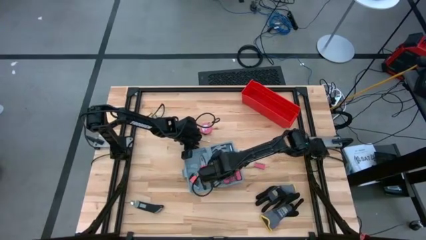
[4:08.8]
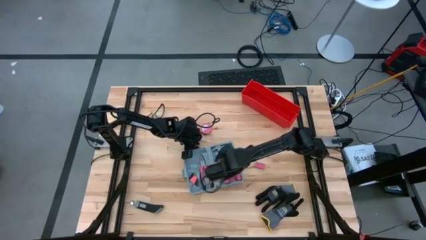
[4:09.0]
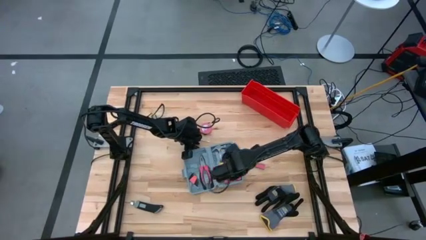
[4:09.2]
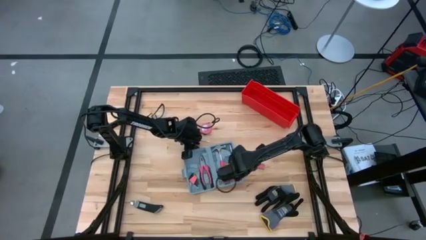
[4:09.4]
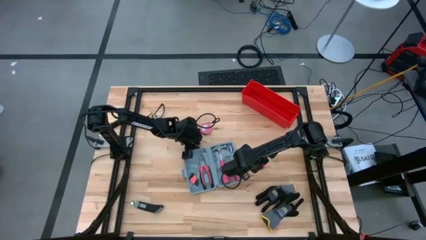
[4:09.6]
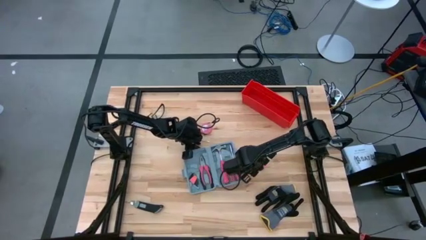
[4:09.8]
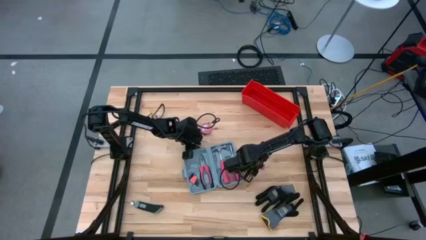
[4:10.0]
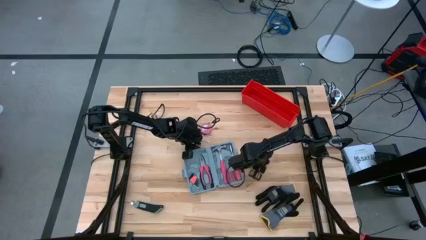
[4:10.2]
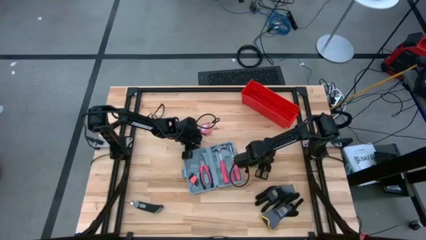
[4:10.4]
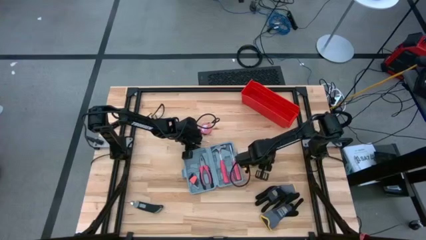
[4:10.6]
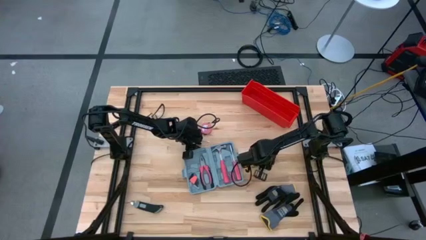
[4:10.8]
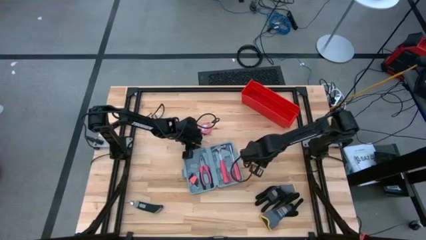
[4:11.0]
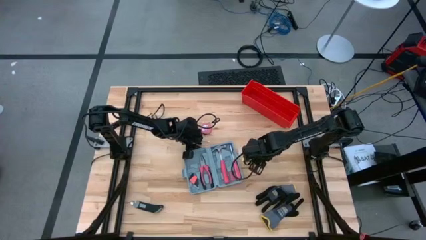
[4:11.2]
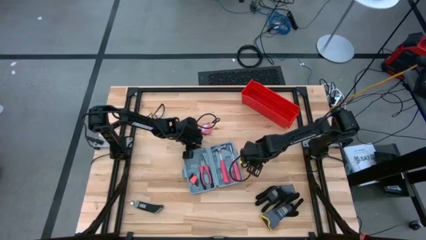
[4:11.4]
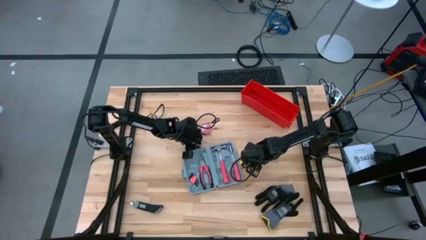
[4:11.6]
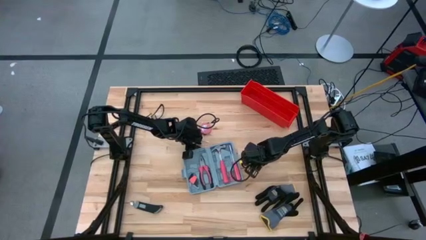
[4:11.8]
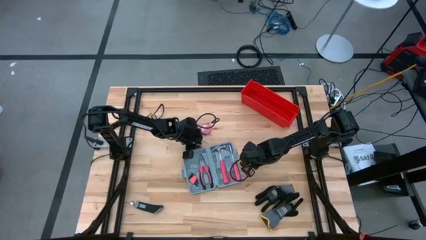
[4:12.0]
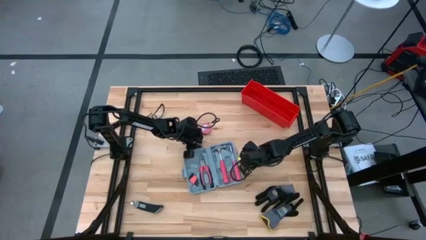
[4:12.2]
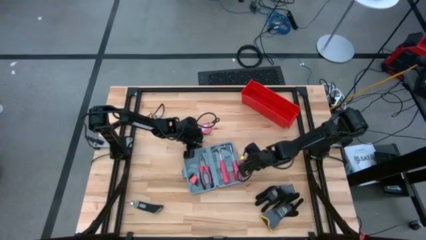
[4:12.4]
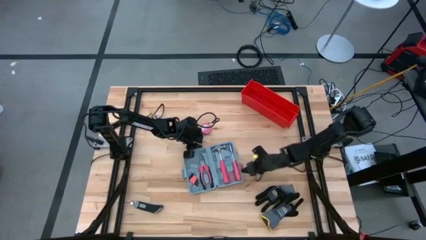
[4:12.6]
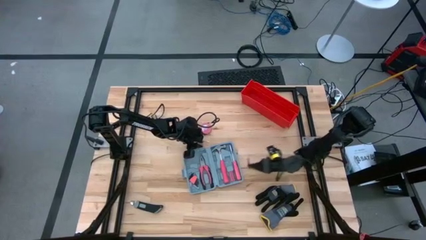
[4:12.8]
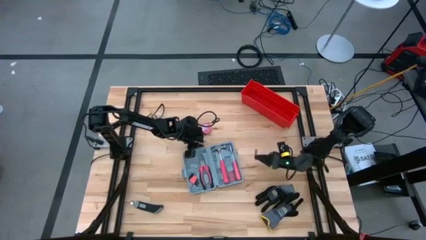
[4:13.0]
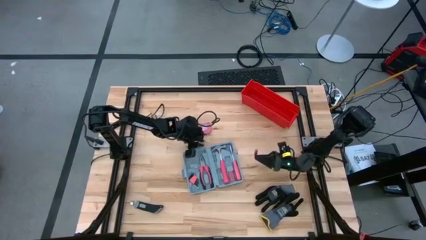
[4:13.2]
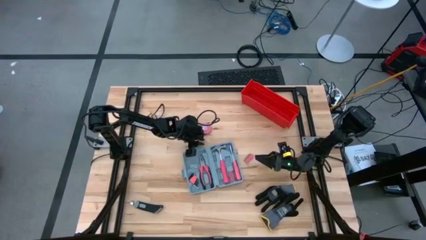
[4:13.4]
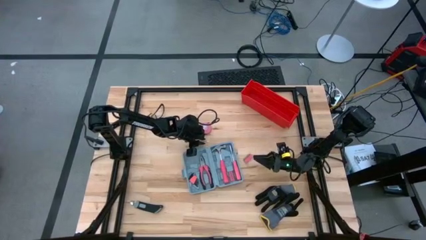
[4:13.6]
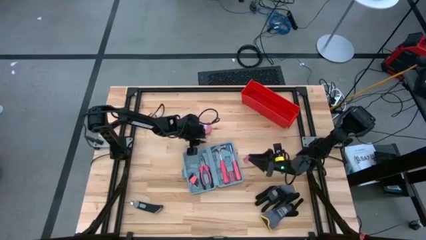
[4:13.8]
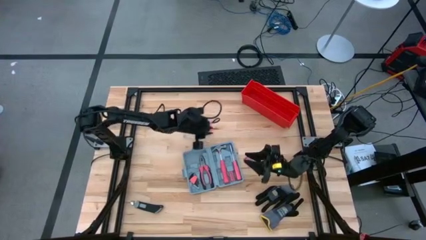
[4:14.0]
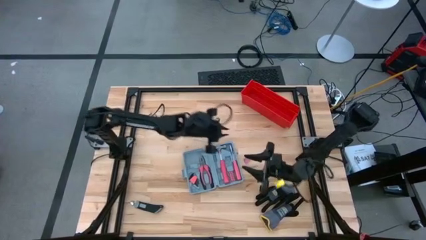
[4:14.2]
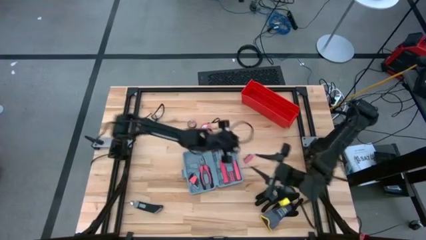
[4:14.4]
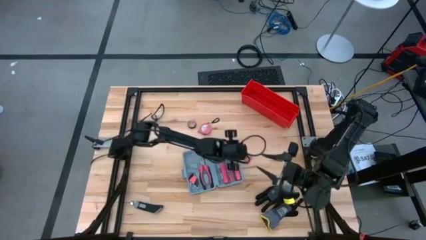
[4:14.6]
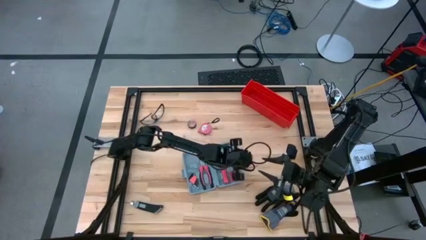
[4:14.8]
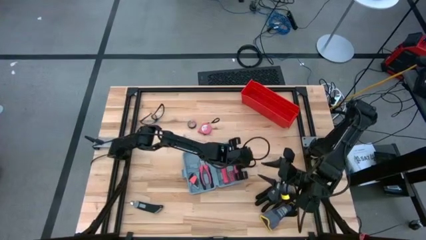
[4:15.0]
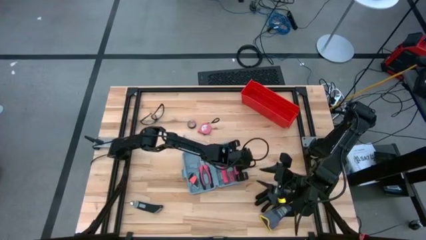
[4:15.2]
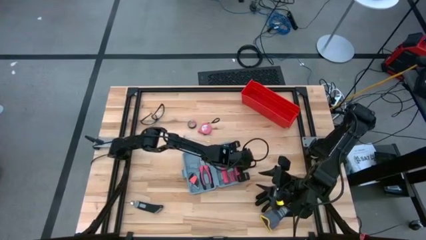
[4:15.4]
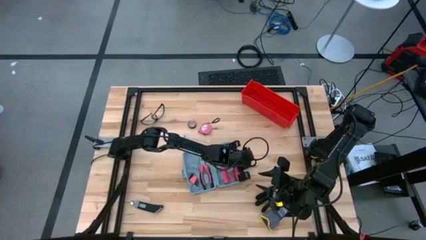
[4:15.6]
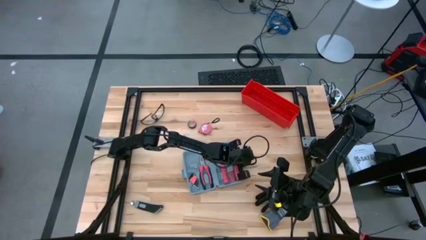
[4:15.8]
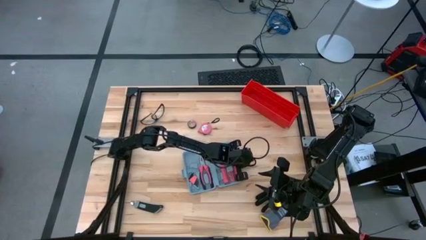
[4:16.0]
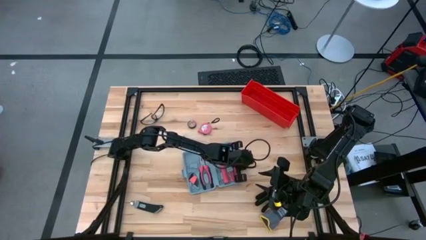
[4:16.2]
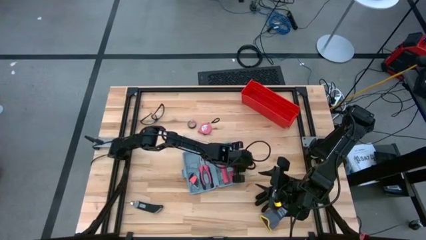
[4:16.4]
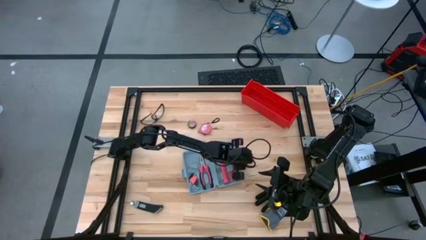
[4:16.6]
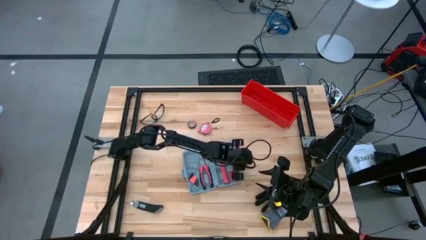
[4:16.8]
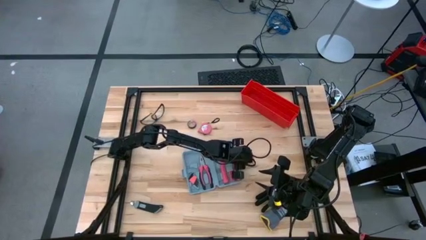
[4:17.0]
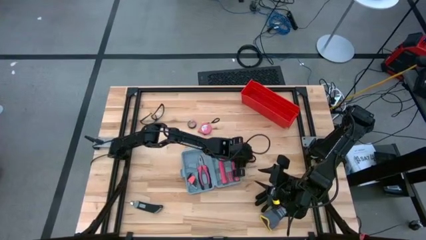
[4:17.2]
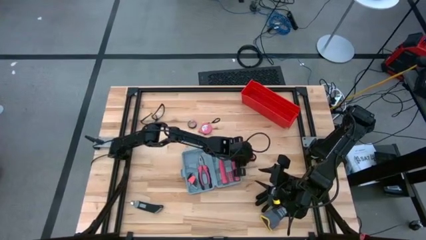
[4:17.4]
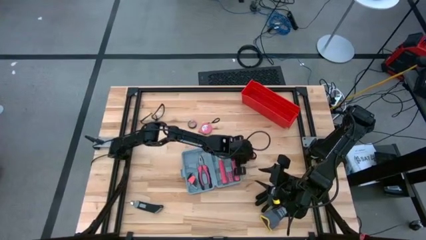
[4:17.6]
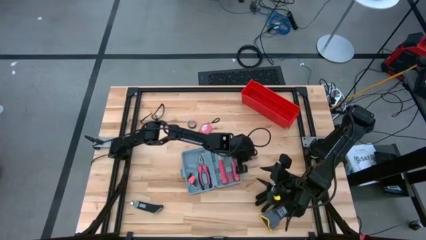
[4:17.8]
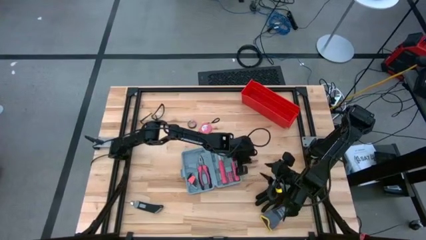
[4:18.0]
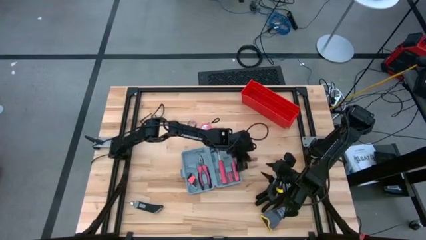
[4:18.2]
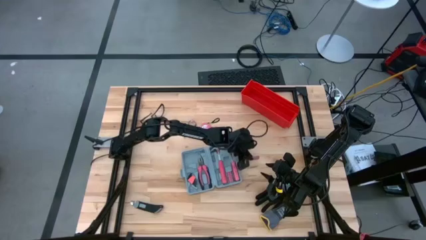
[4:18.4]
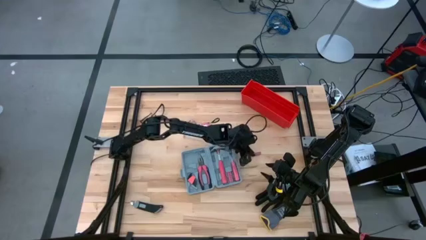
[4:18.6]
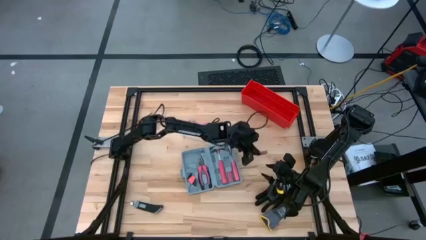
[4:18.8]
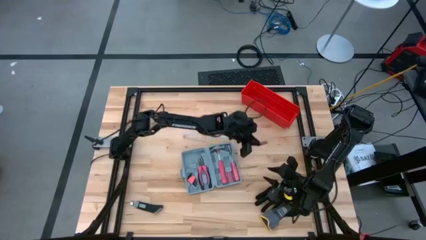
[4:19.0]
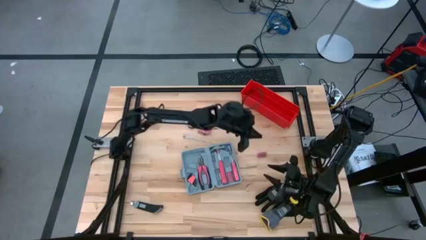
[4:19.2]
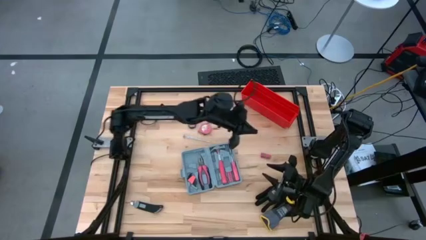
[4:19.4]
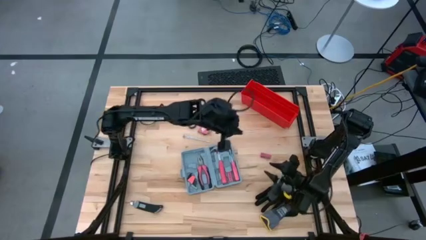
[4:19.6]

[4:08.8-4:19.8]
Task: prefit tool cases
Put the screwdriver bits into the toolbox

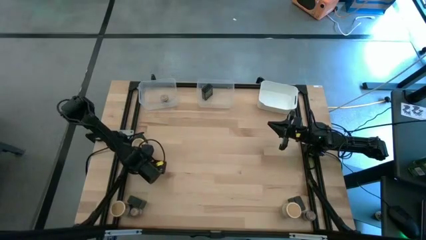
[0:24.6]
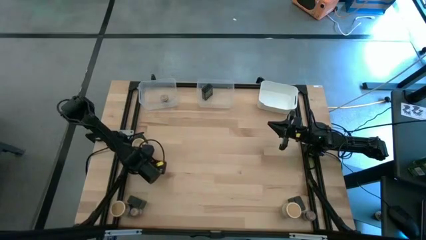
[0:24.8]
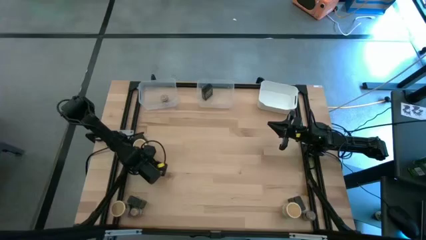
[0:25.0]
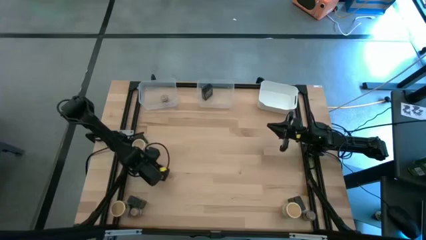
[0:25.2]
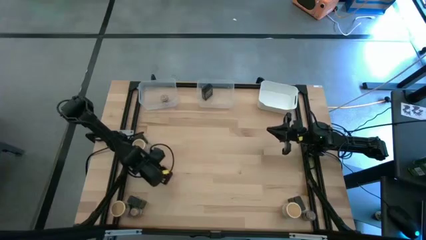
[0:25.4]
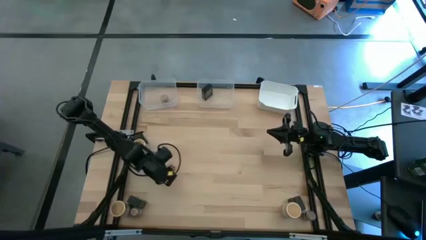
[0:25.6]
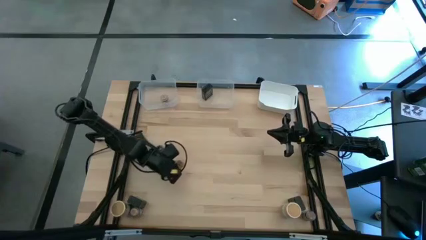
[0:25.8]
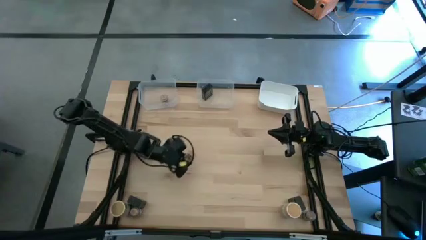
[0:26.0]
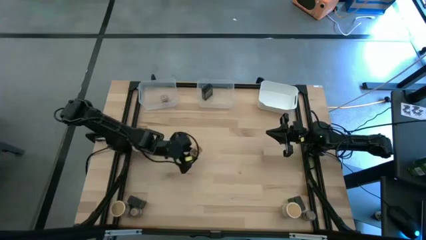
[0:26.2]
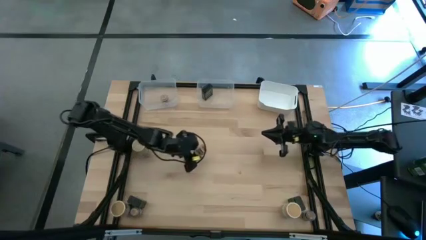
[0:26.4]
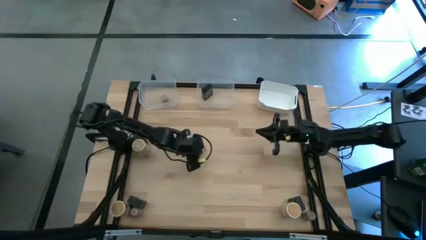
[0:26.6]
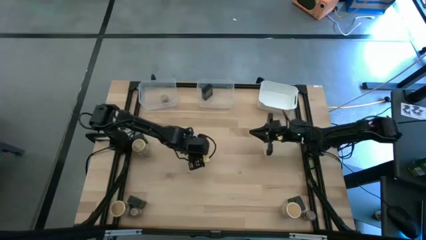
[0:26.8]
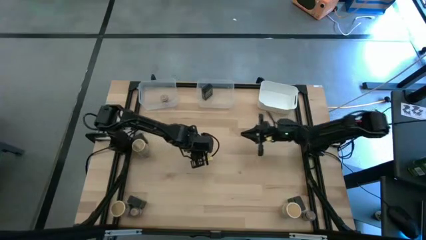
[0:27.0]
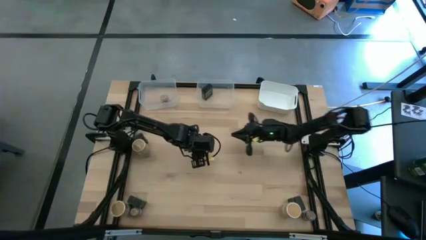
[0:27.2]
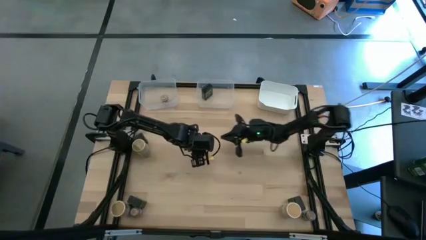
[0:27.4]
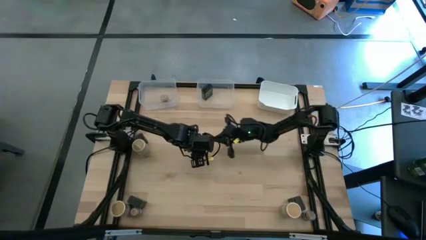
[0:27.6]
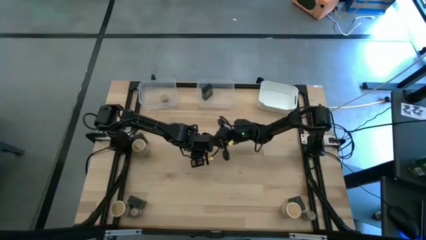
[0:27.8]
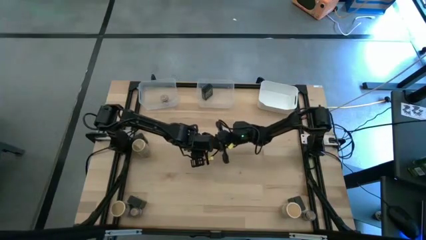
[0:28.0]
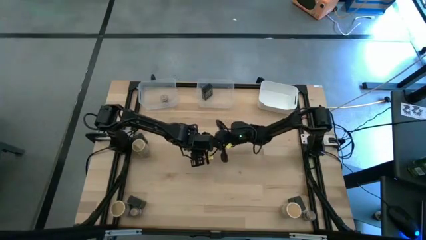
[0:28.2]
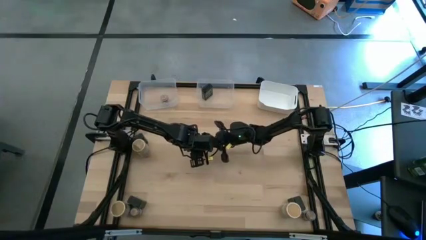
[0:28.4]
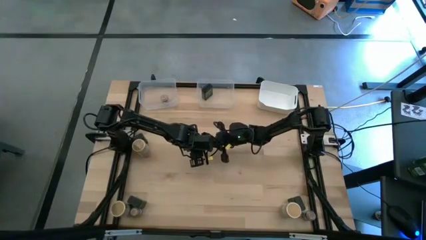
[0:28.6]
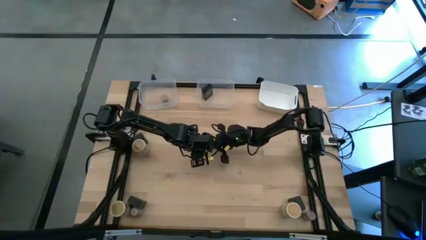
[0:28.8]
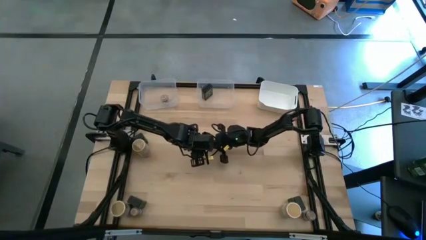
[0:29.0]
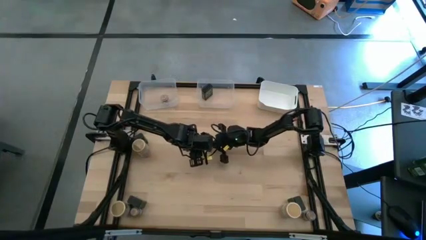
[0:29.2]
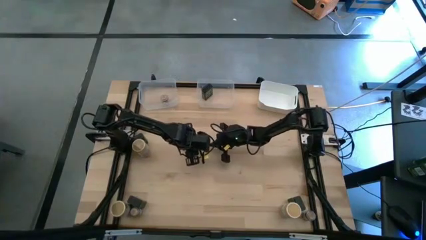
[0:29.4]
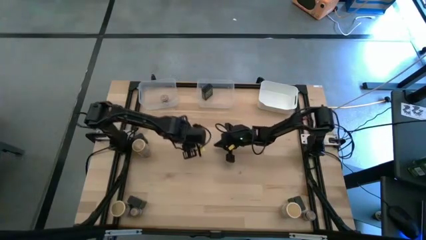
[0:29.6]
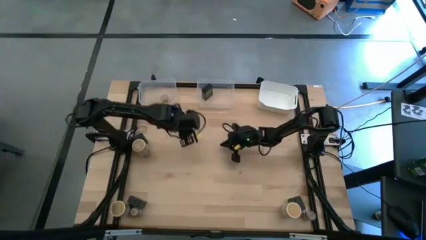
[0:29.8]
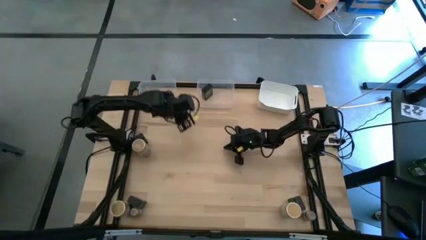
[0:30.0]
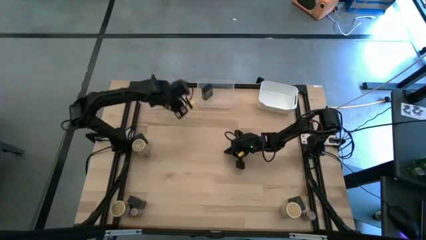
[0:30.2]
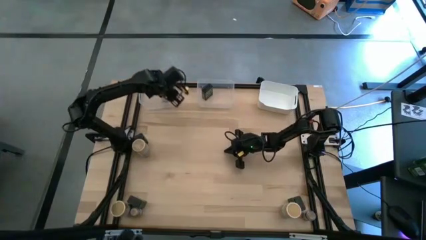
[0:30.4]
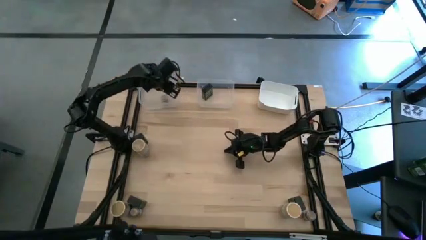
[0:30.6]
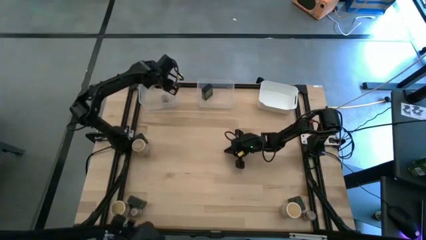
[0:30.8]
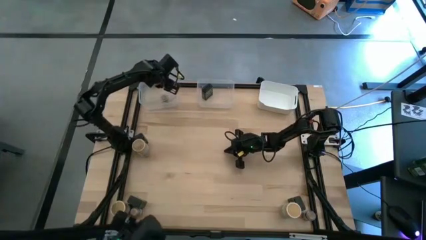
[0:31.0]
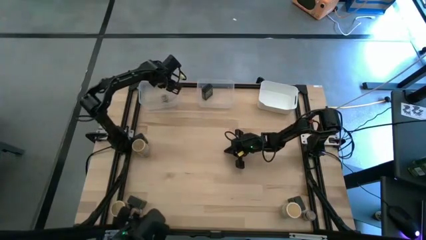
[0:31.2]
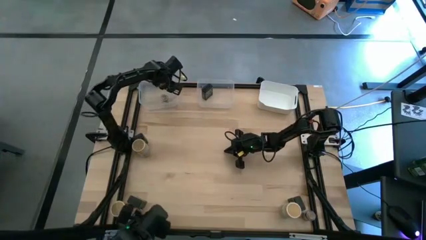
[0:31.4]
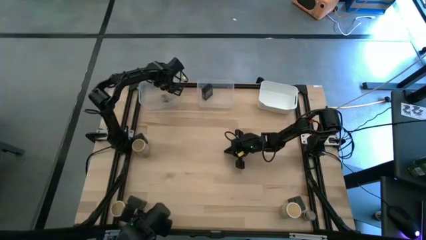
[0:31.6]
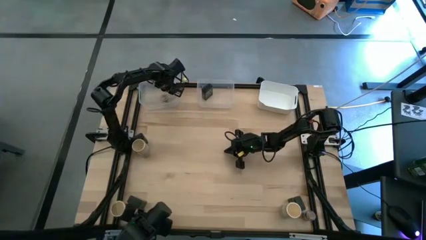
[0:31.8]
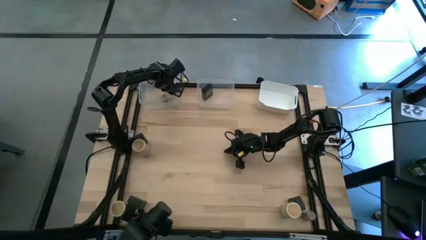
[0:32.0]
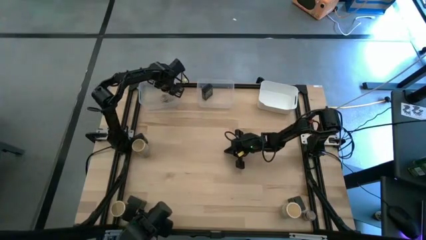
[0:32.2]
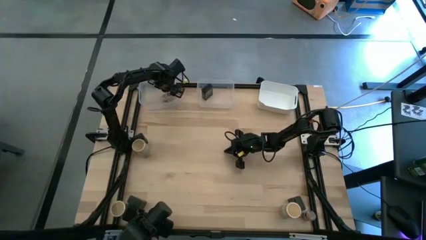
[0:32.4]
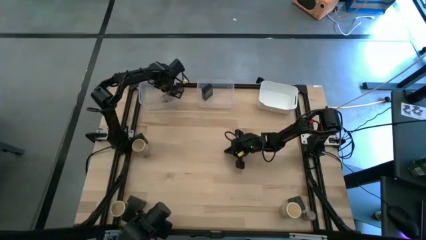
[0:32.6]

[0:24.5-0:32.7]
Task: Sort spices by type
Put the top left brown seasoning bottle into the left transparent bin
